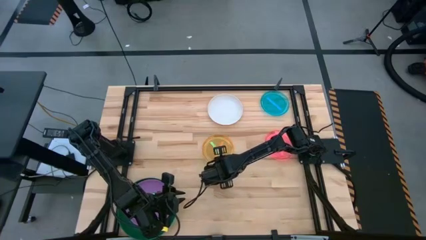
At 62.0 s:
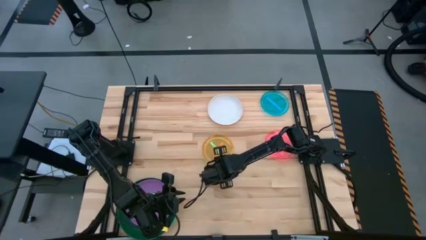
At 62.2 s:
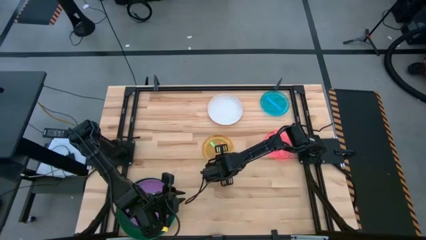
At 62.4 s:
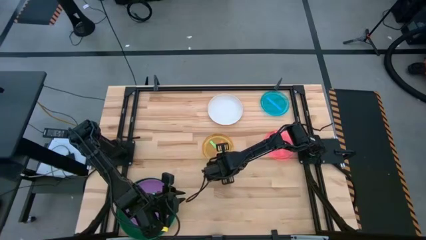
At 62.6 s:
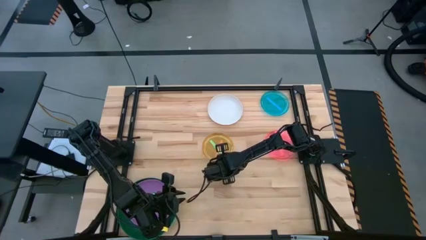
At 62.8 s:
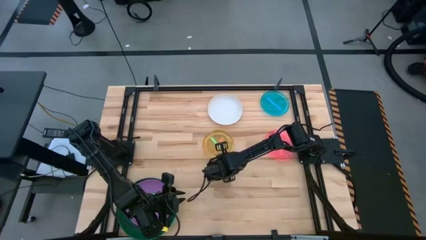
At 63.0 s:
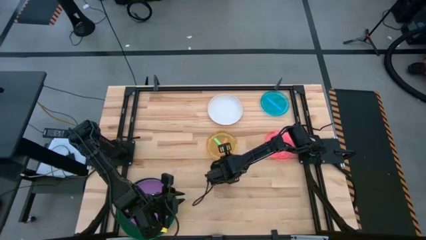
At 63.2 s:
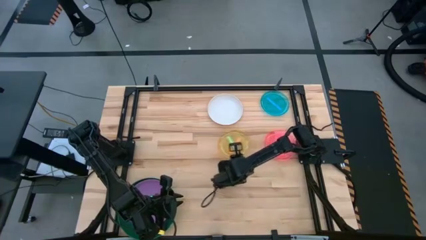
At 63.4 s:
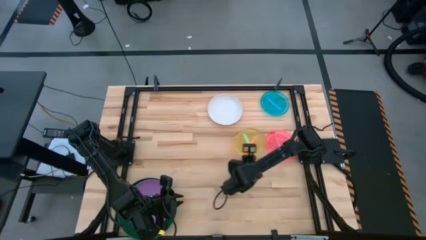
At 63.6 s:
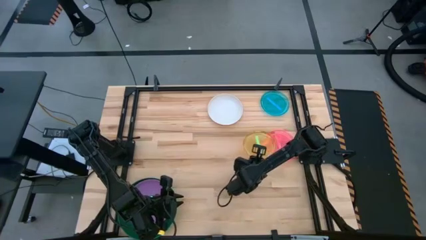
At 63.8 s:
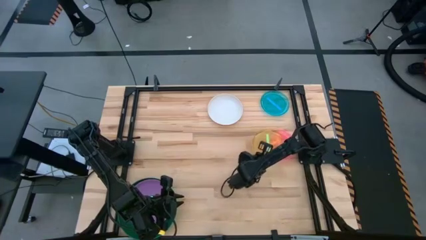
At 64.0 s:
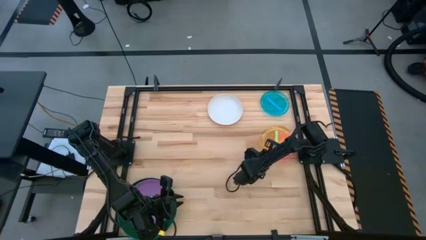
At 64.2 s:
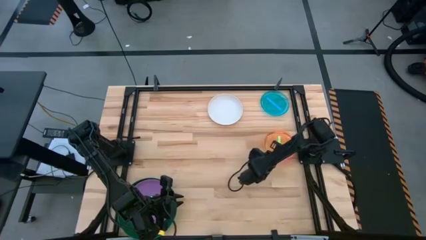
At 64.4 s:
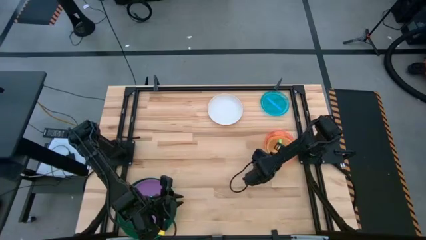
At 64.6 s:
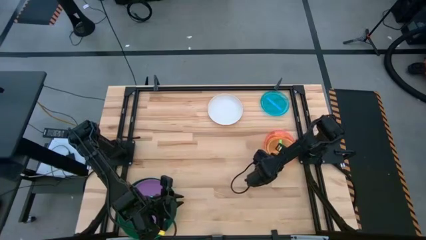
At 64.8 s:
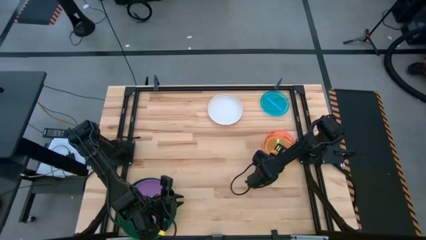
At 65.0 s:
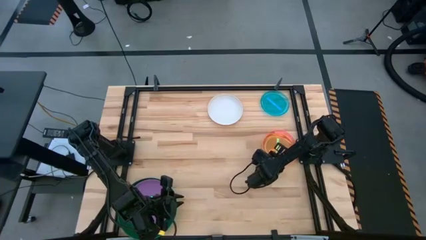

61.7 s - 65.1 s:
Task: Stack plastic plates
Stack the stacked plates on top of the pink plate

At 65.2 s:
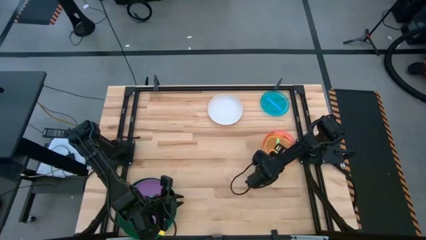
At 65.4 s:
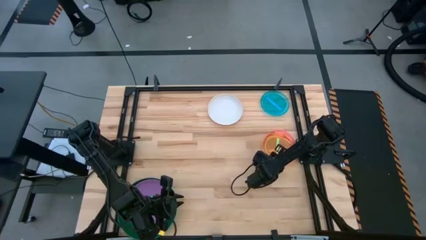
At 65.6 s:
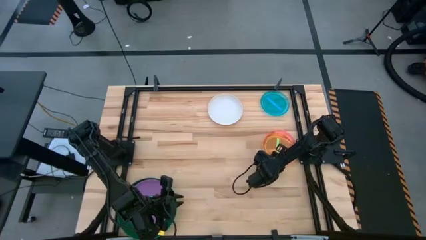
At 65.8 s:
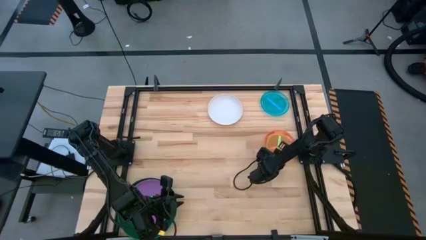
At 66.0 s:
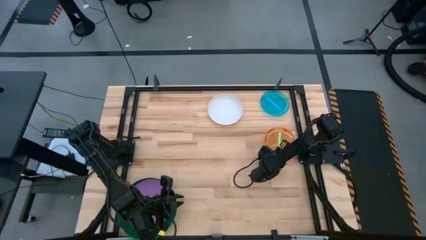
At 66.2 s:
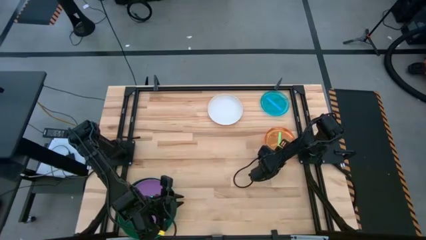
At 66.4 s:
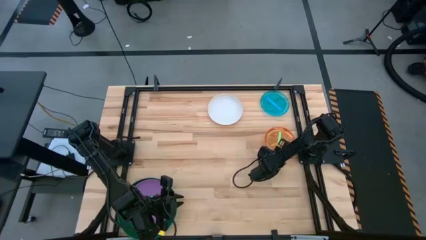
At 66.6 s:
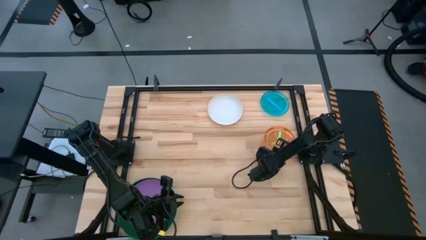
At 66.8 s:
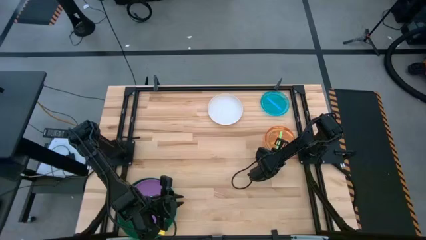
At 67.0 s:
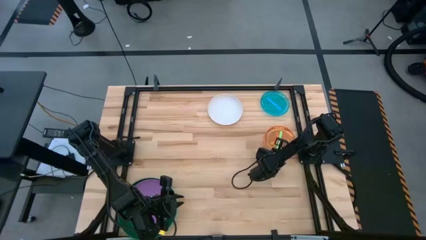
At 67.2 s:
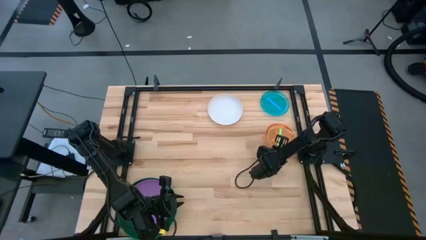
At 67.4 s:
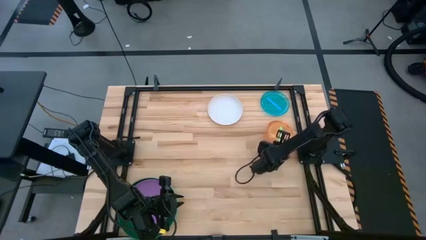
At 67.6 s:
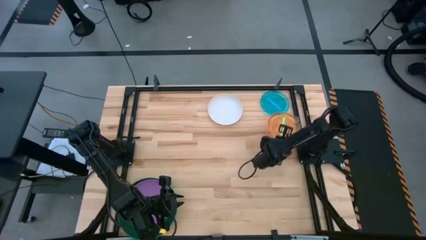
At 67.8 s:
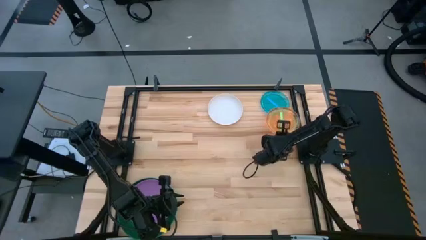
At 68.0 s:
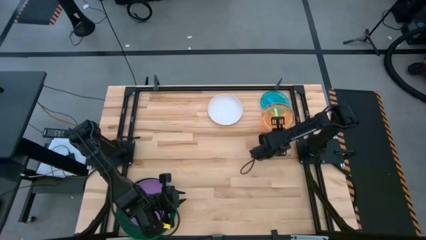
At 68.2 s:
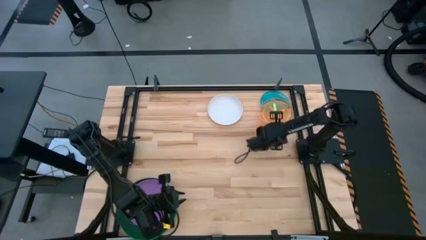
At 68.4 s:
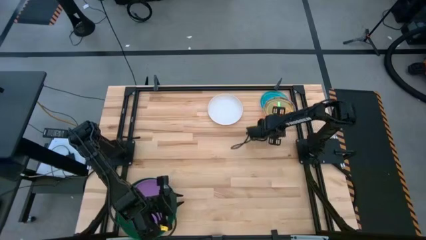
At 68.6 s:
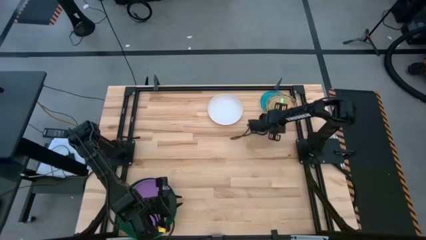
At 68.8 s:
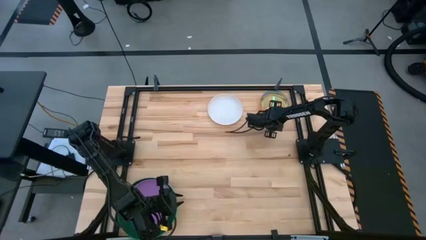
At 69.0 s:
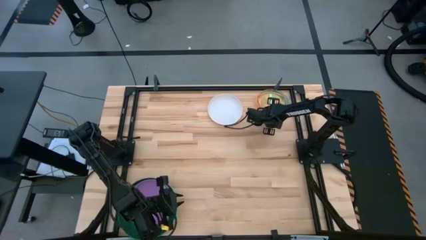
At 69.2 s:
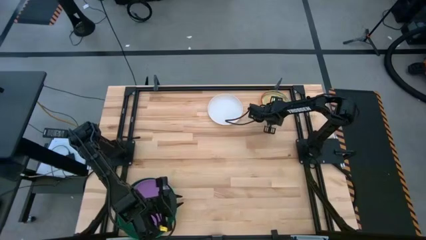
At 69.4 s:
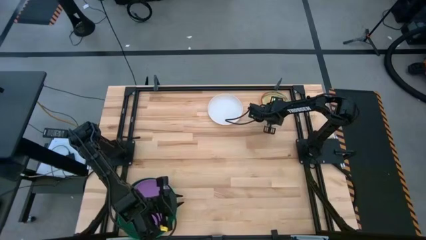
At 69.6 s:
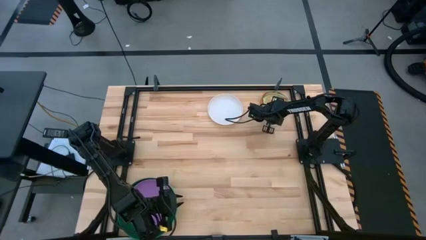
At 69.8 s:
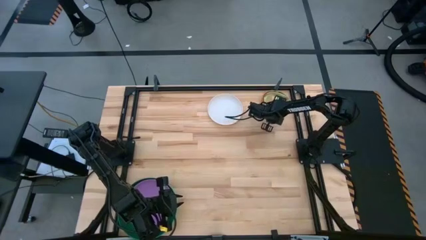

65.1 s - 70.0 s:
Stack the stacked plates on top of the blue plate

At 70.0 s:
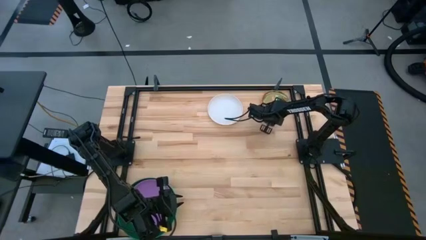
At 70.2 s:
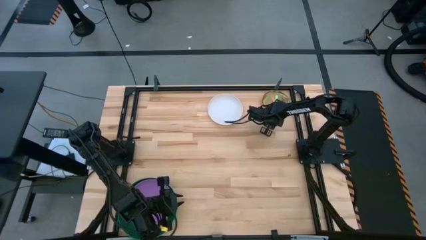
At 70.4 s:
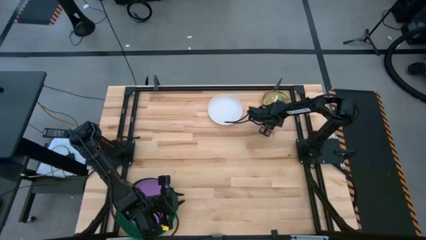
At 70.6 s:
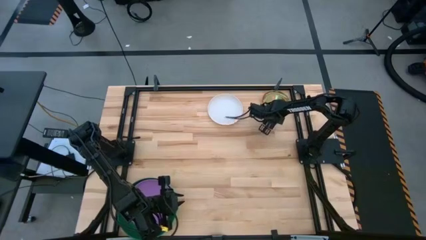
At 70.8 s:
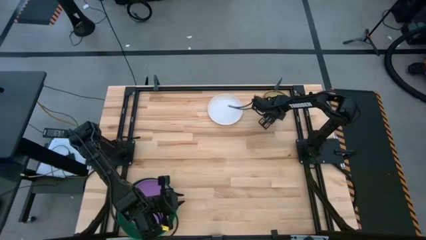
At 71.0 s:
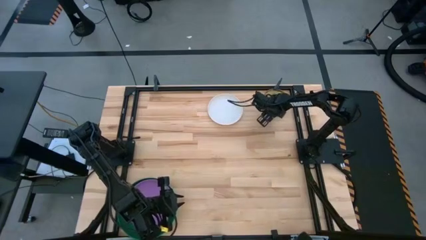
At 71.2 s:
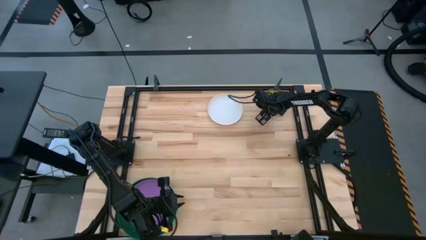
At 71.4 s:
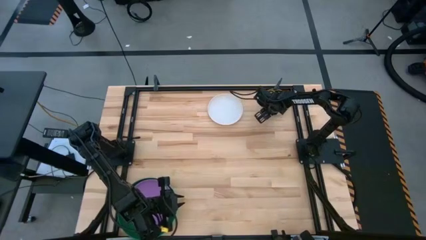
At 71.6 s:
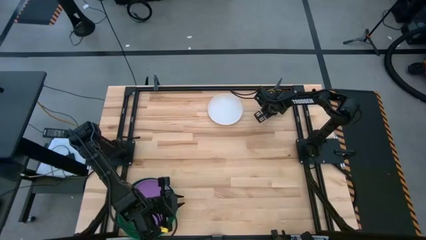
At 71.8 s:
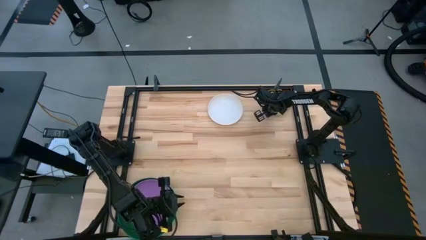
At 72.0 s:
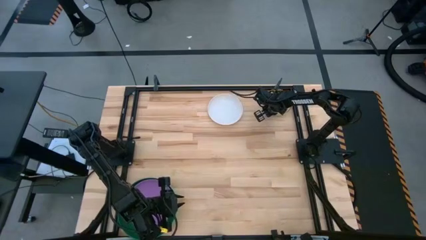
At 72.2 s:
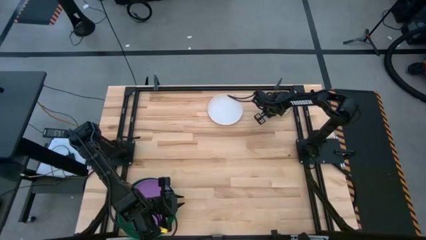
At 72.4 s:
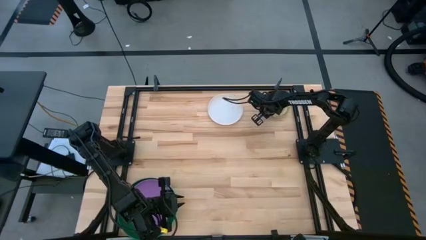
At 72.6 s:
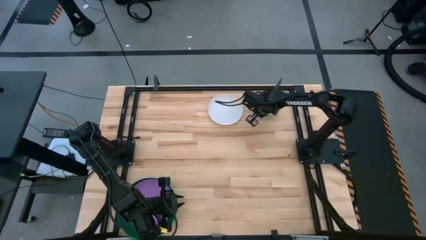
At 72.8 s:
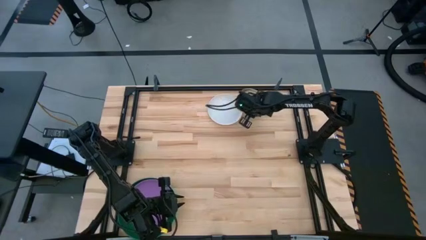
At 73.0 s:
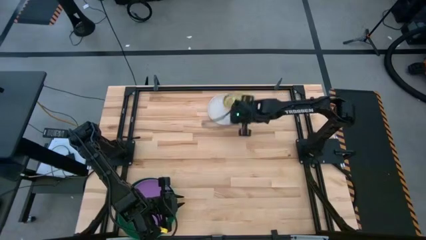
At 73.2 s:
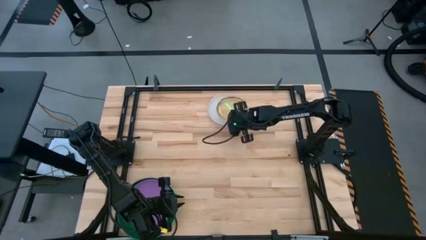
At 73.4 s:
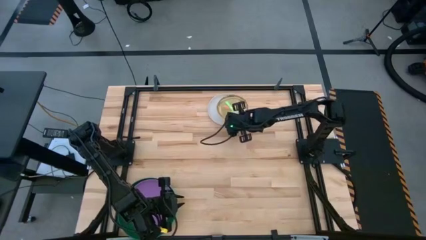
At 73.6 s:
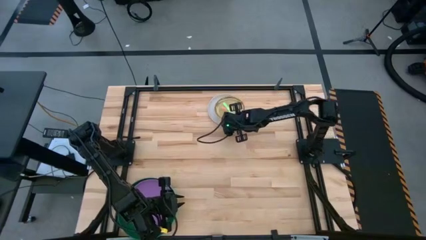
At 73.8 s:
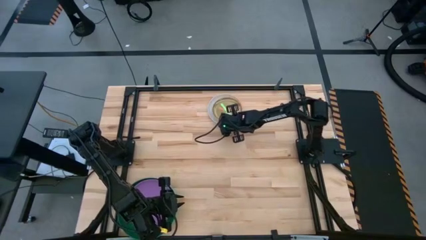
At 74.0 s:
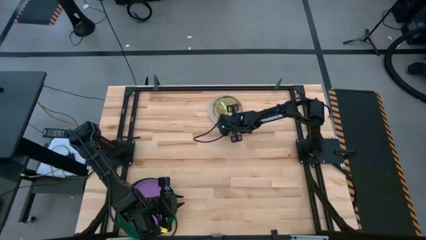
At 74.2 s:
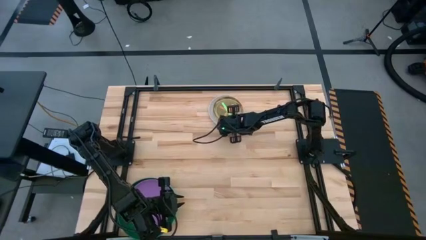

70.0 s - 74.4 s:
Stack the stacked plates on top of the white plate
